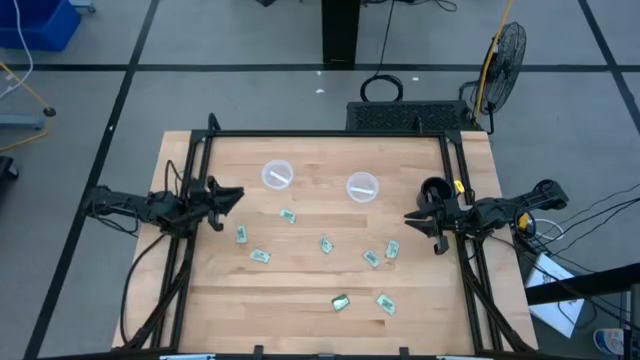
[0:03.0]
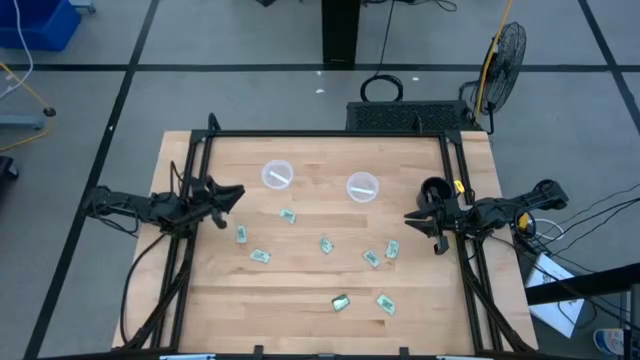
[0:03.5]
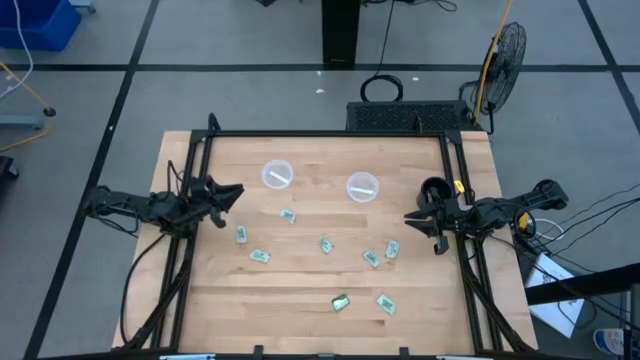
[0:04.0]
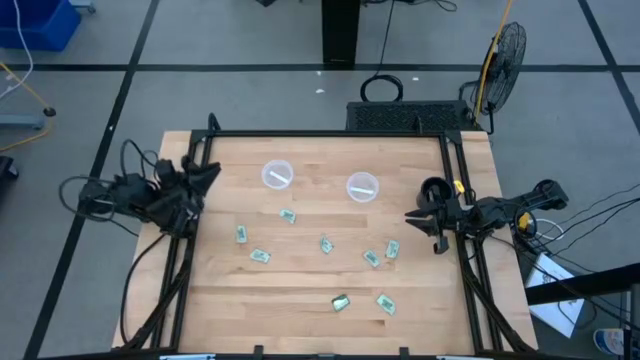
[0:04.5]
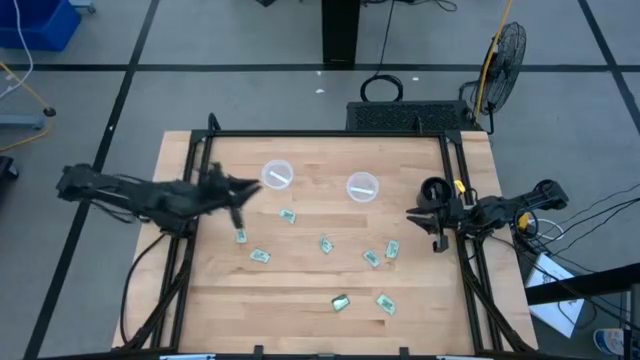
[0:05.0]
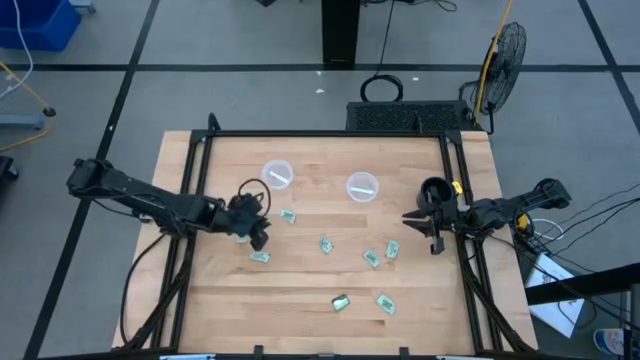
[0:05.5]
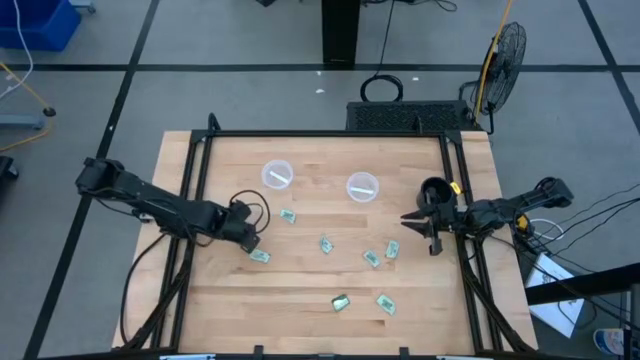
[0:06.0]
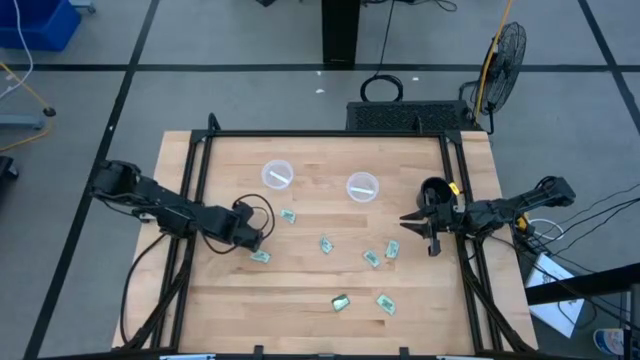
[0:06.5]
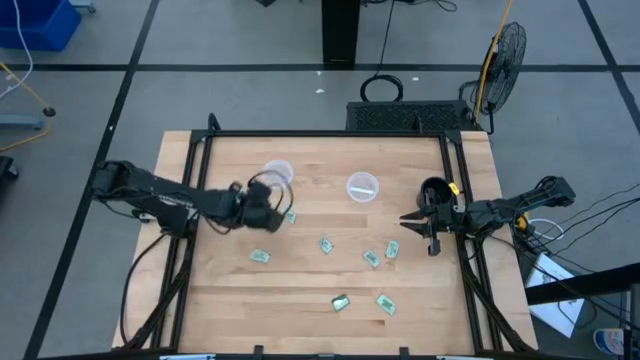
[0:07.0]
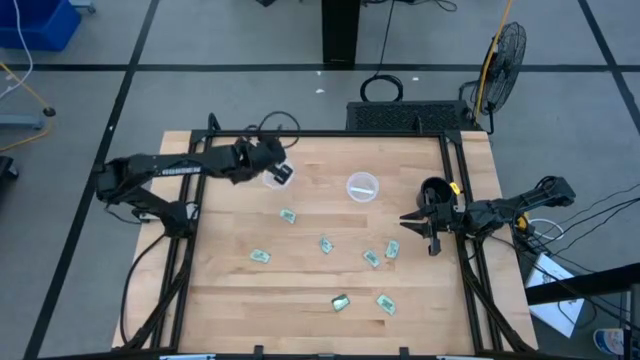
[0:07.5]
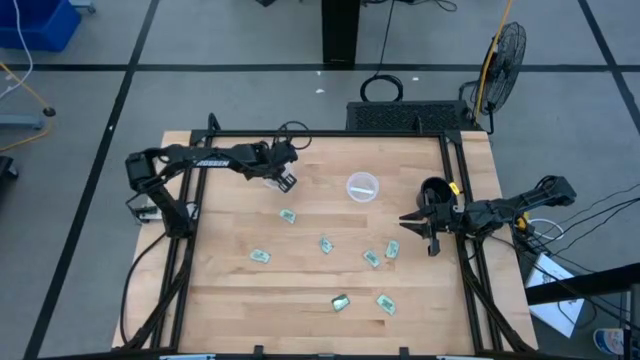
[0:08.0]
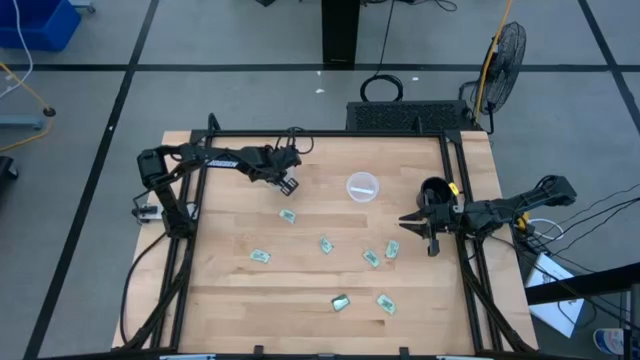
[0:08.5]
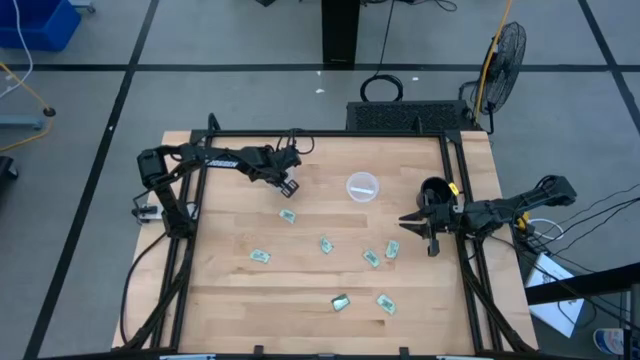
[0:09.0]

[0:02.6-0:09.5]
Task: Pick and place items into bin
Put the stevia packet into the left transparent bin

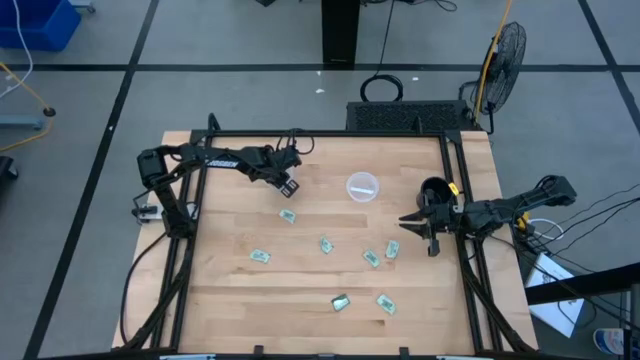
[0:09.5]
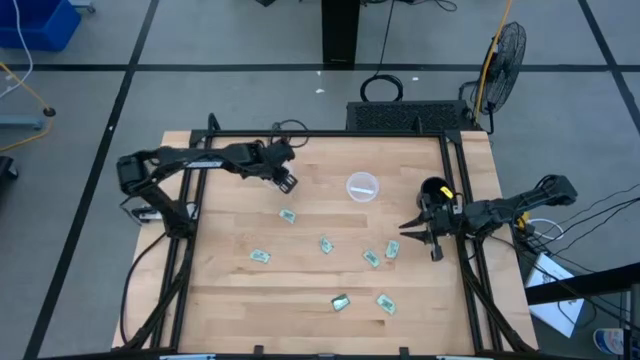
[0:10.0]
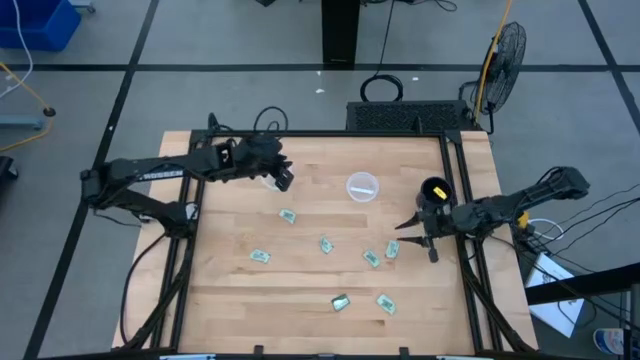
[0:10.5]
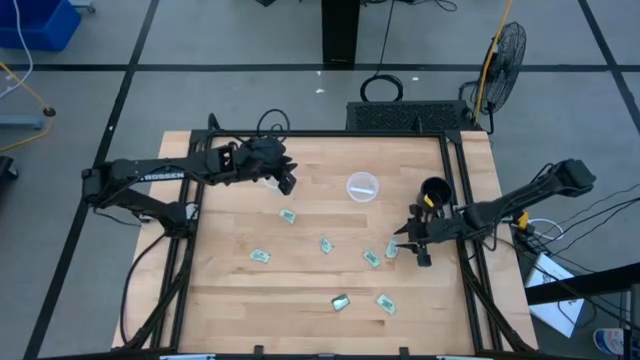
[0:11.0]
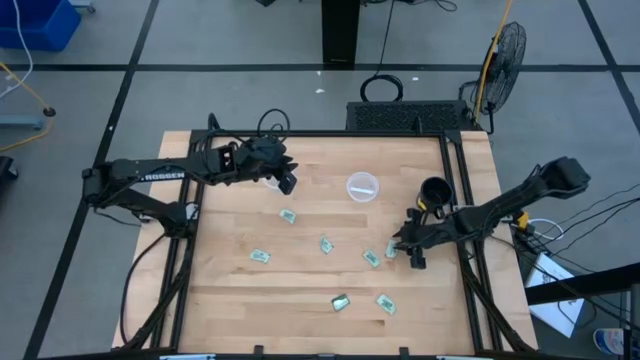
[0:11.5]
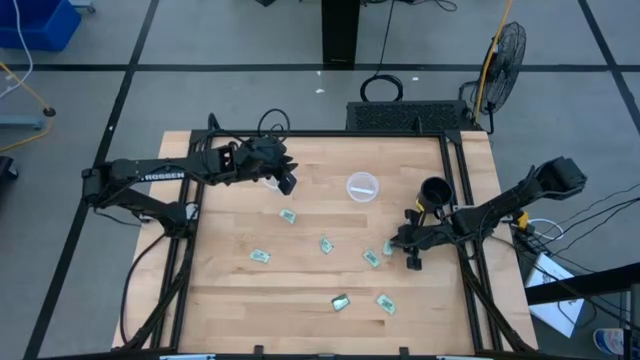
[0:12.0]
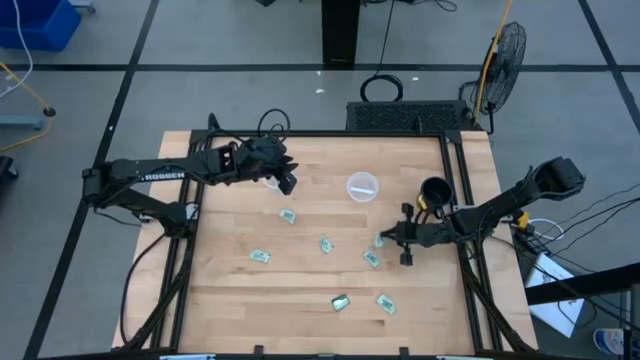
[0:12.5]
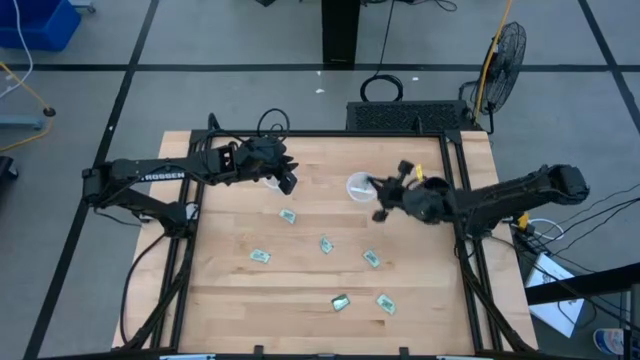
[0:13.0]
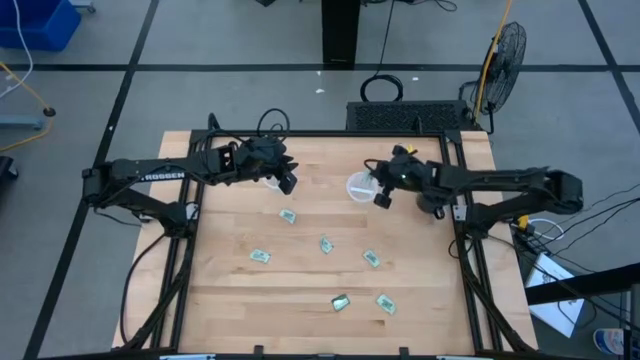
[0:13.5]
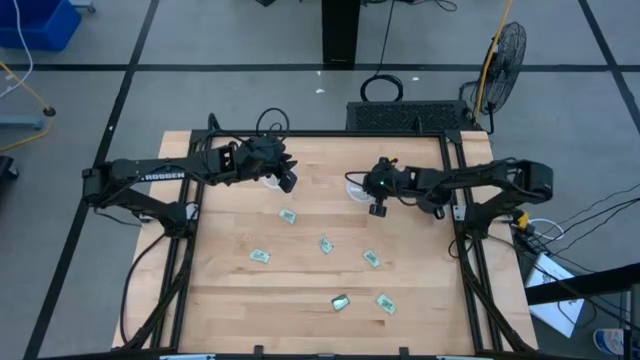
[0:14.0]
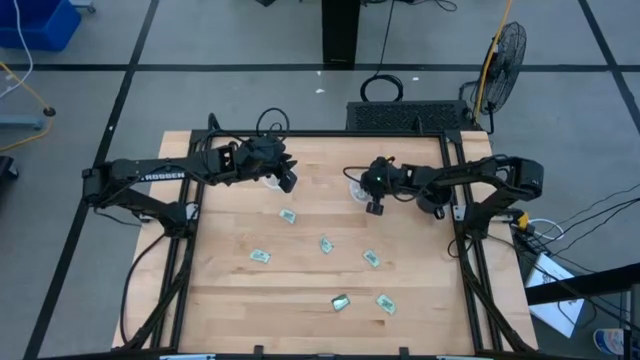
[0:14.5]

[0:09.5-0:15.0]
Put the truvia packet into the right transparent bin

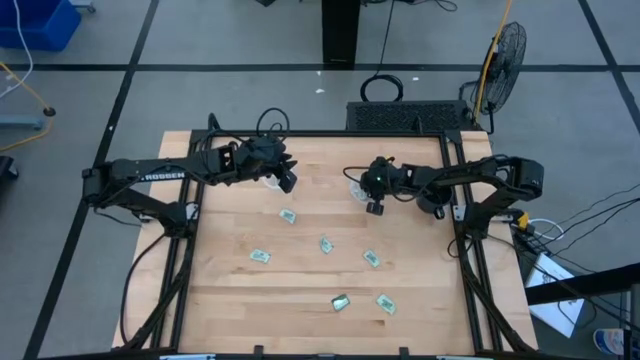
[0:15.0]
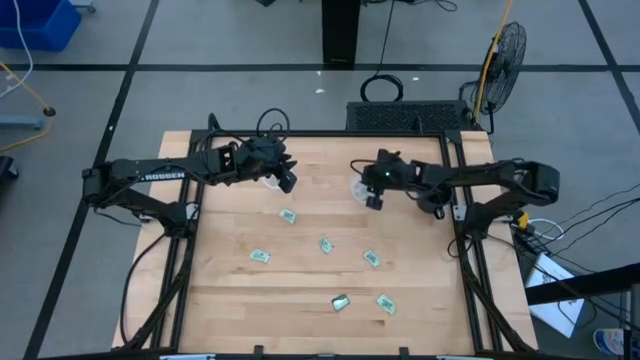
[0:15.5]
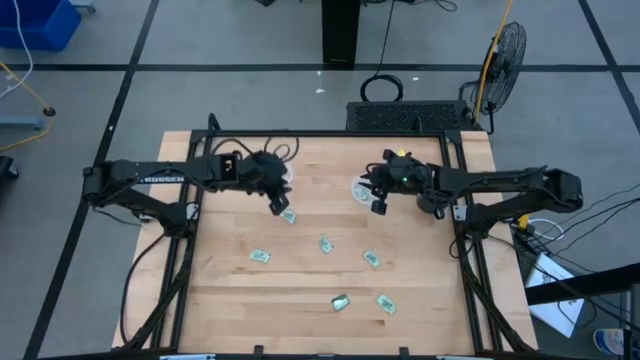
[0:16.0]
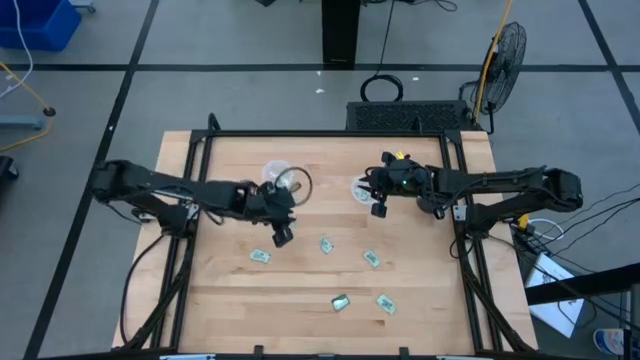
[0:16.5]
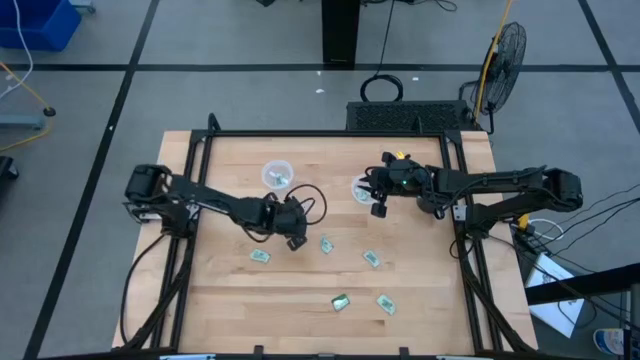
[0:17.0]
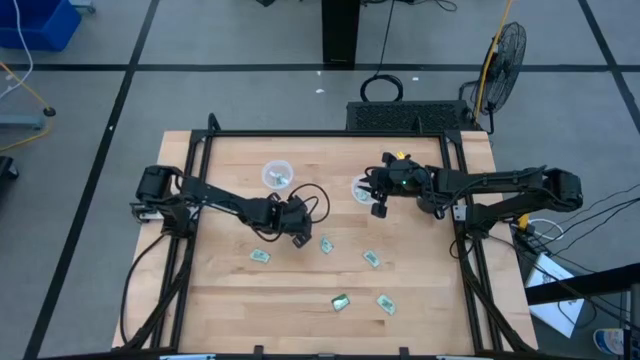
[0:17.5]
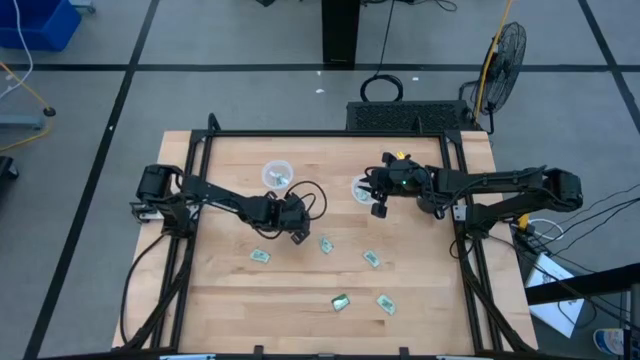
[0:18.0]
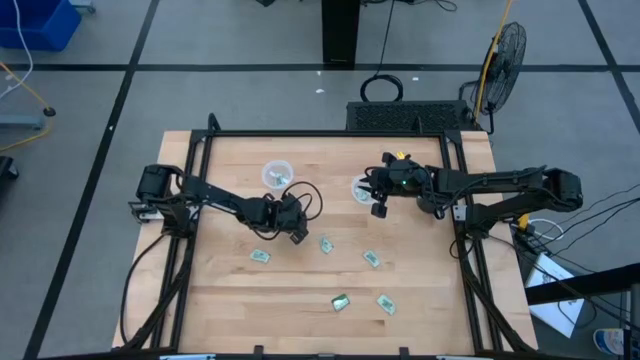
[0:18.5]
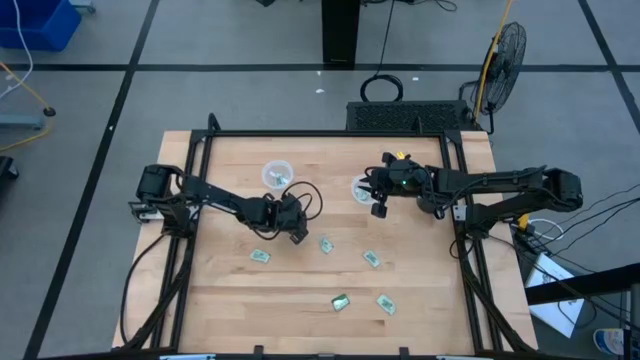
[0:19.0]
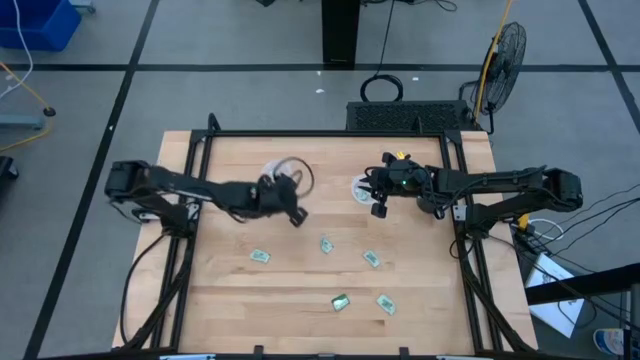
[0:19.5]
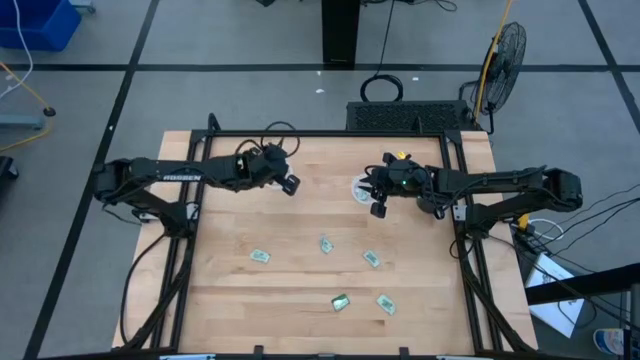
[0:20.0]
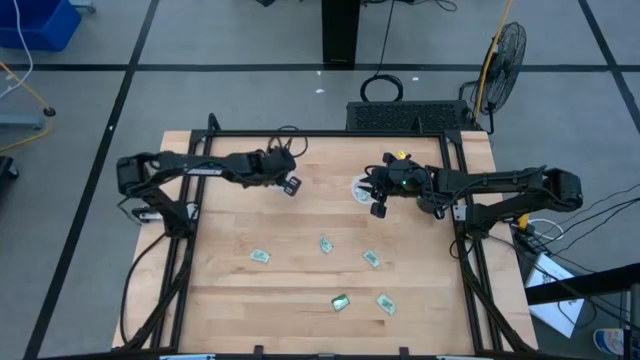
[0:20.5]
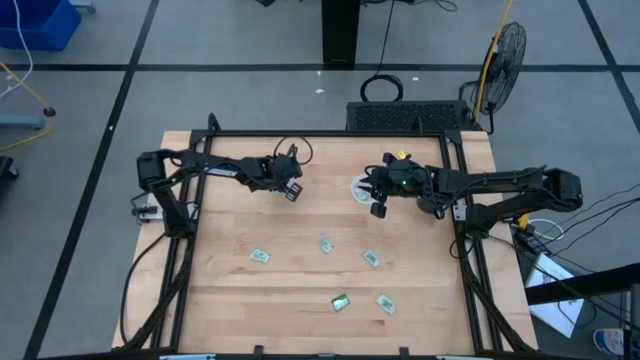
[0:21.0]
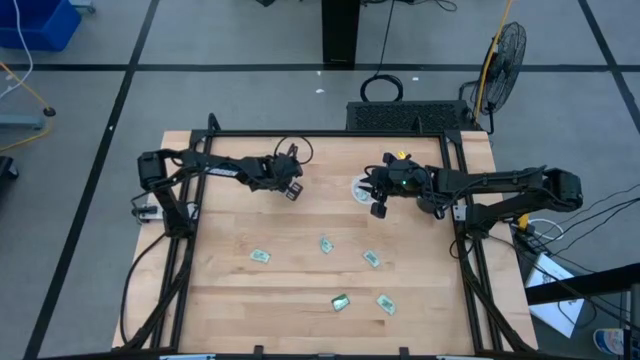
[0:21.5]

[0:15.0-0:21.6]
Put the stevia packet into the left transparent bin

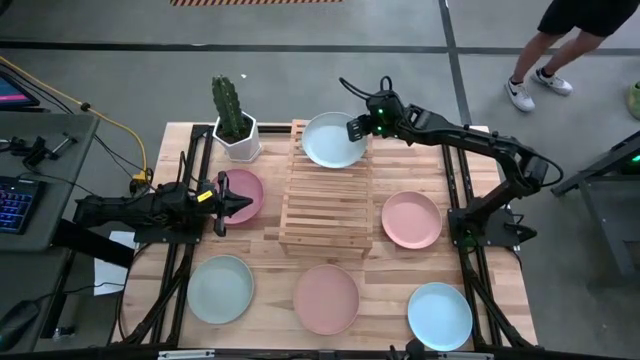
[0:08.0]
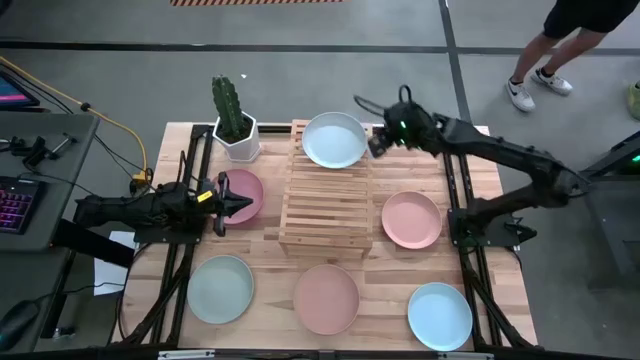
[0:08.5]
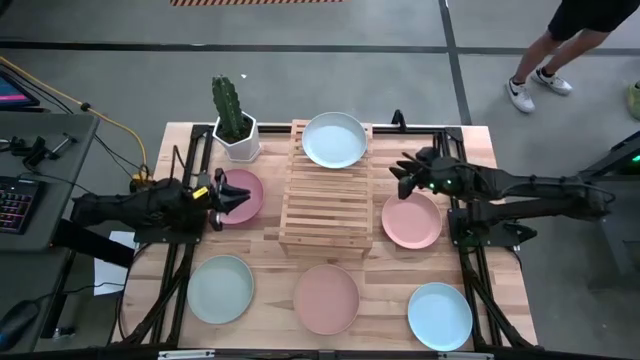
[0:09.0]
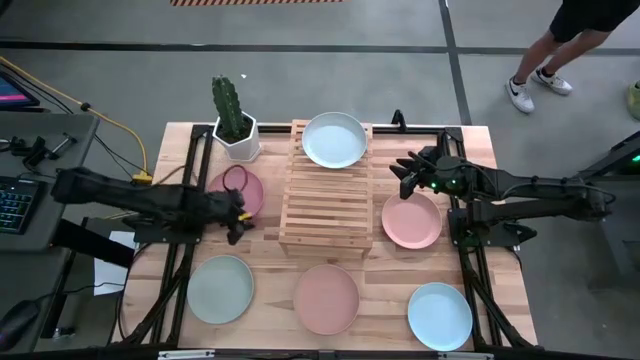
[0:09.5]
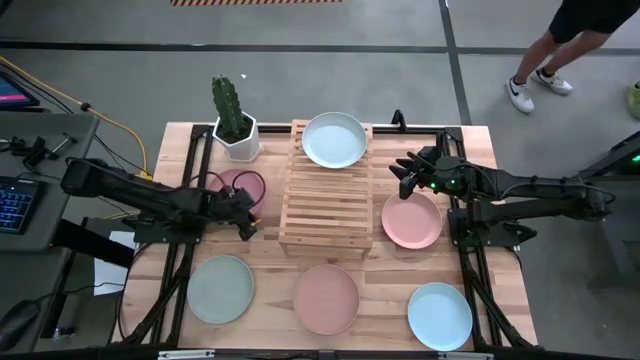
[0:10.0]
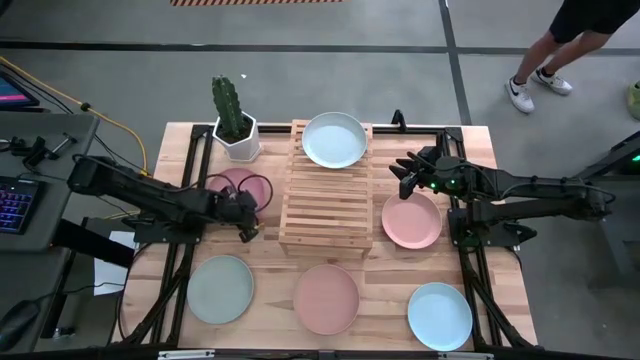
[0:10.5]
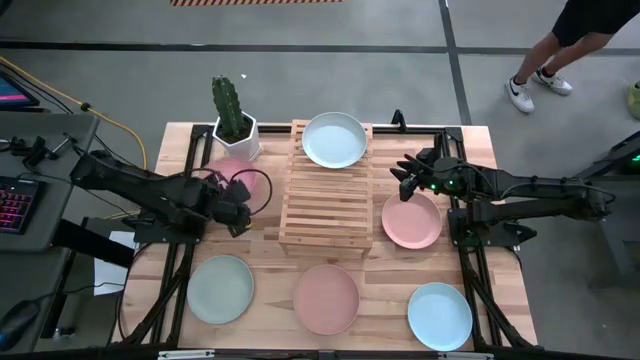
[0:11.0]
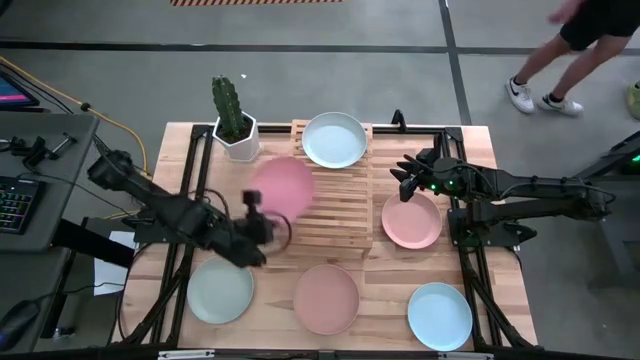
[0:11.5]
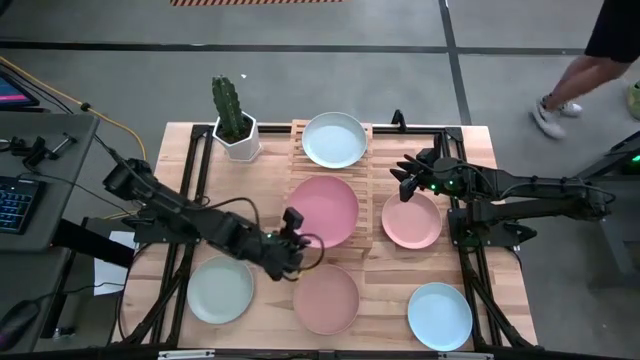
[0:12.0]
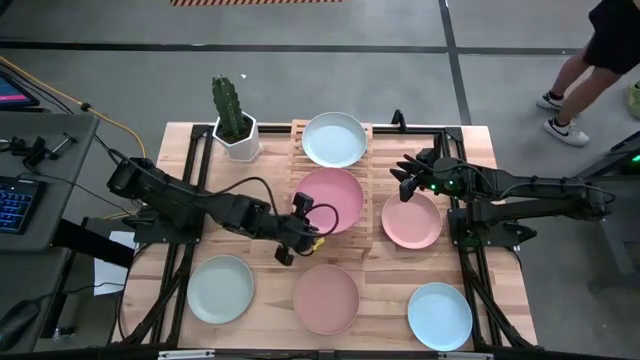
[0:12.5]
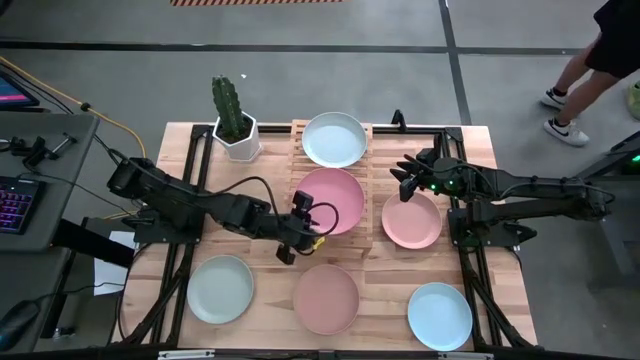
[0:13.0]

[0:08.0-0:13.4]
Task: Place and stack plates onto a shelf
Put the pink plate on the shelf
